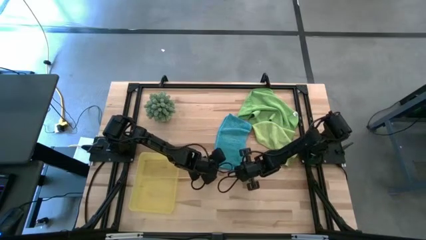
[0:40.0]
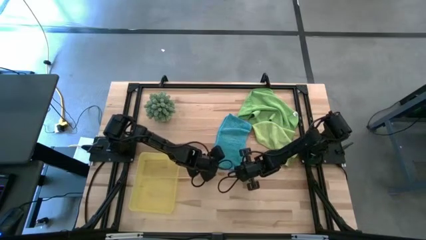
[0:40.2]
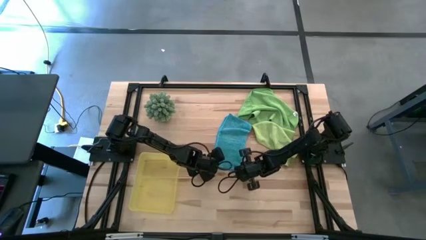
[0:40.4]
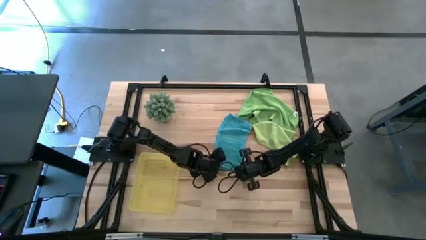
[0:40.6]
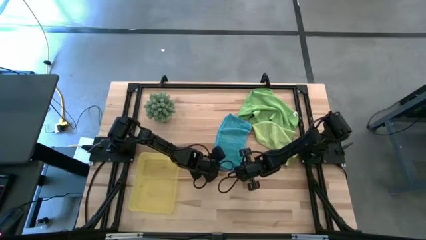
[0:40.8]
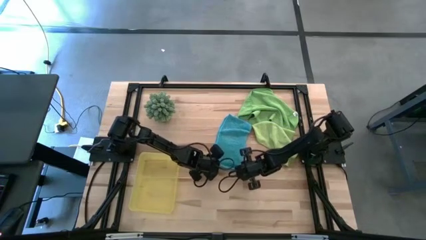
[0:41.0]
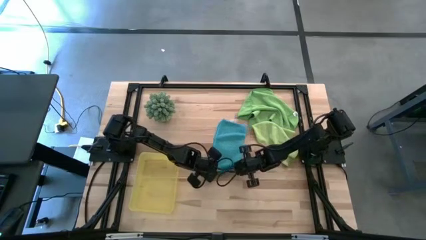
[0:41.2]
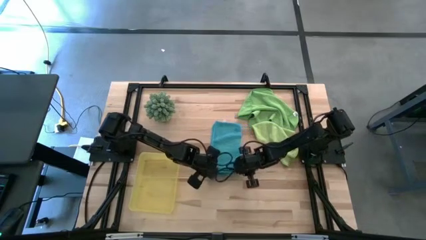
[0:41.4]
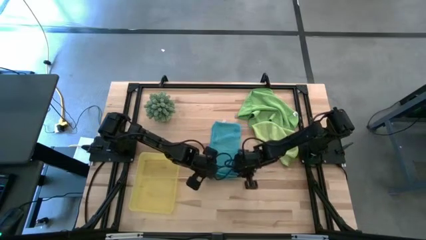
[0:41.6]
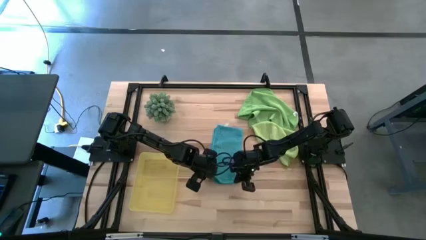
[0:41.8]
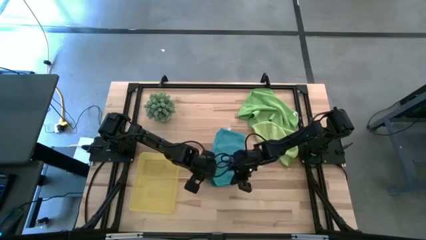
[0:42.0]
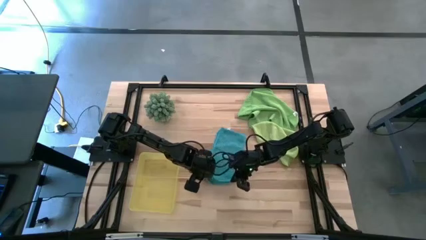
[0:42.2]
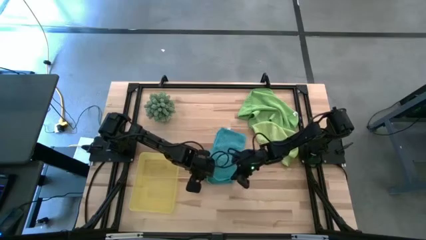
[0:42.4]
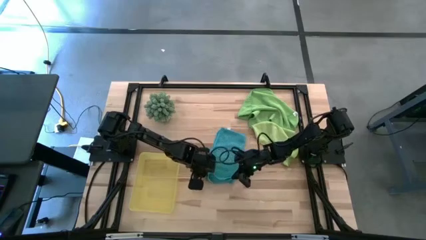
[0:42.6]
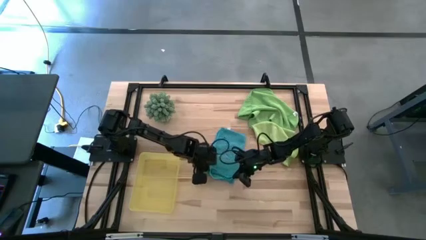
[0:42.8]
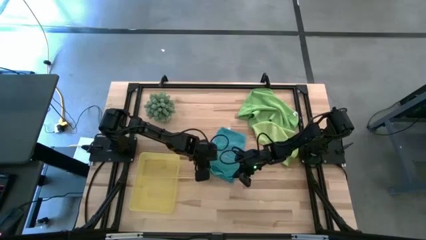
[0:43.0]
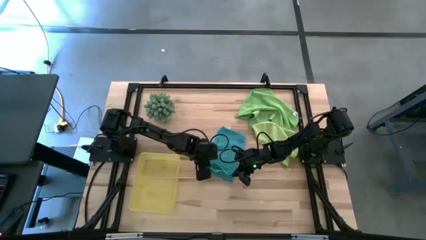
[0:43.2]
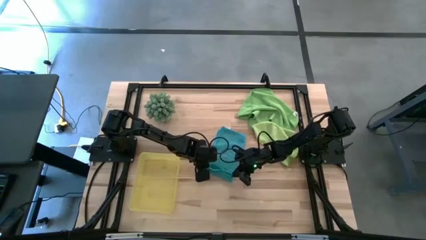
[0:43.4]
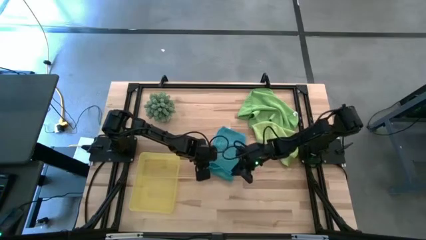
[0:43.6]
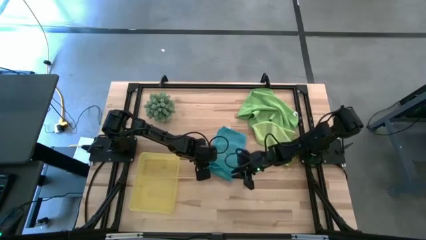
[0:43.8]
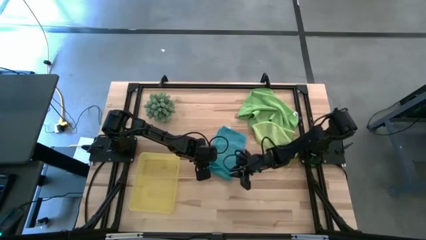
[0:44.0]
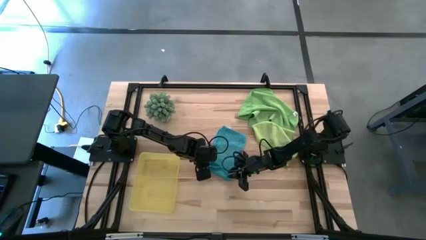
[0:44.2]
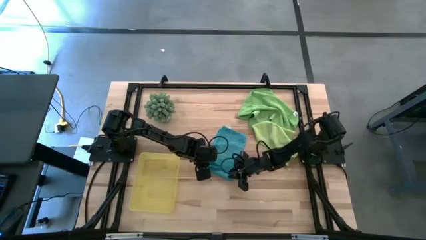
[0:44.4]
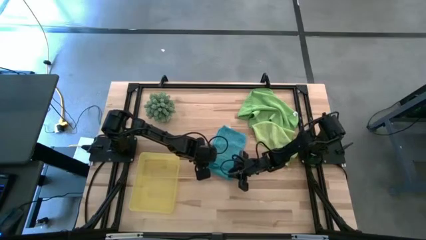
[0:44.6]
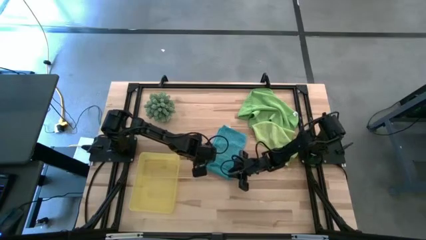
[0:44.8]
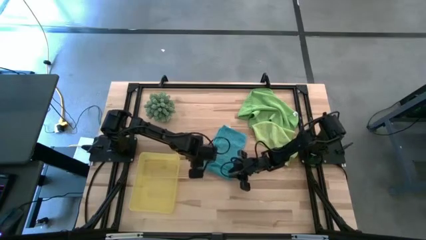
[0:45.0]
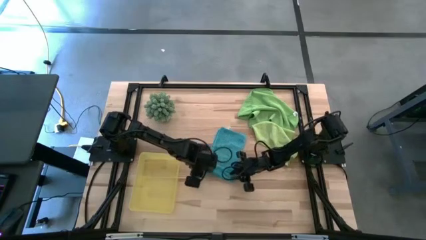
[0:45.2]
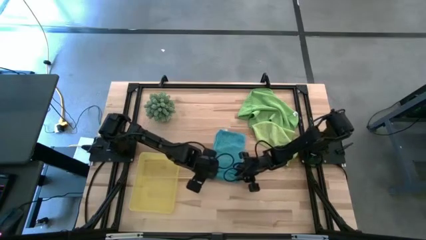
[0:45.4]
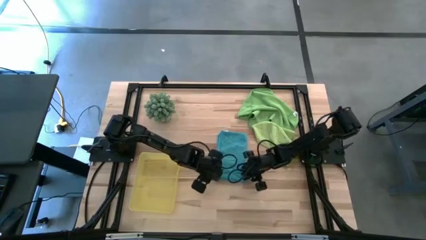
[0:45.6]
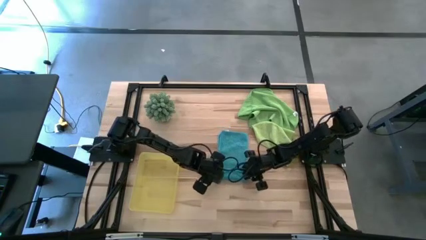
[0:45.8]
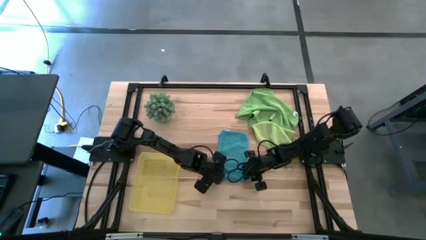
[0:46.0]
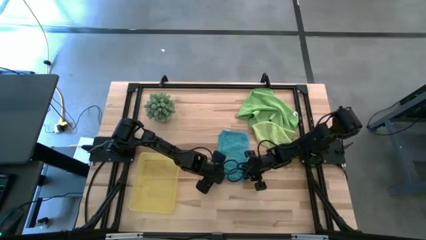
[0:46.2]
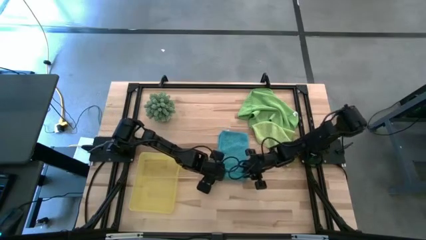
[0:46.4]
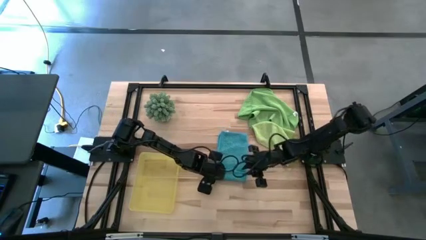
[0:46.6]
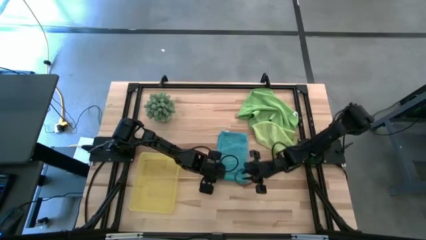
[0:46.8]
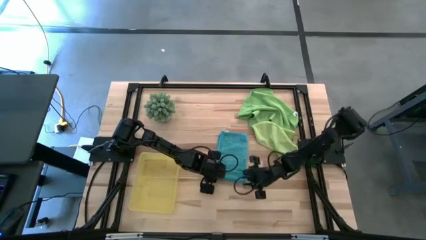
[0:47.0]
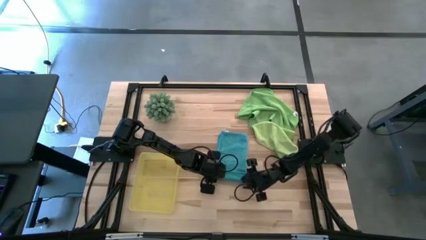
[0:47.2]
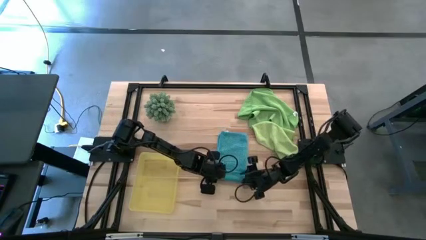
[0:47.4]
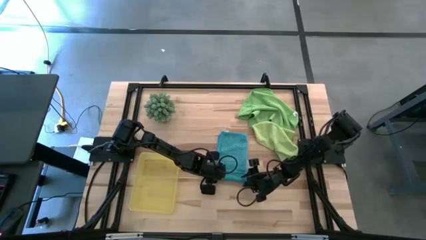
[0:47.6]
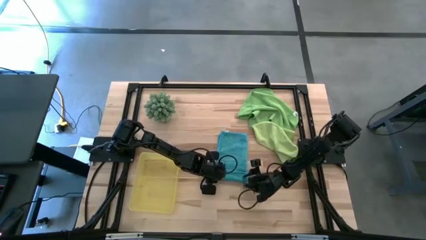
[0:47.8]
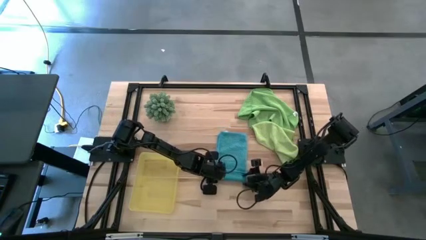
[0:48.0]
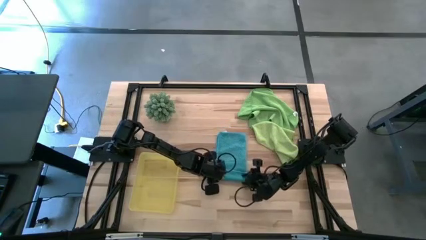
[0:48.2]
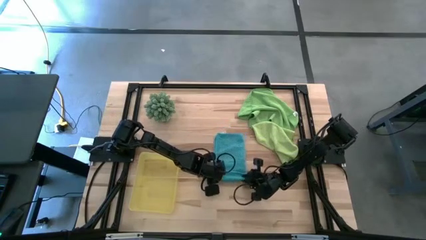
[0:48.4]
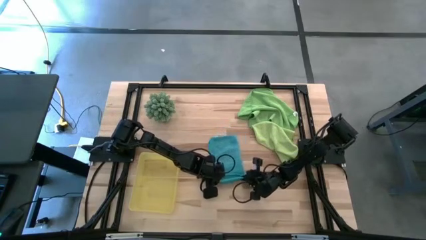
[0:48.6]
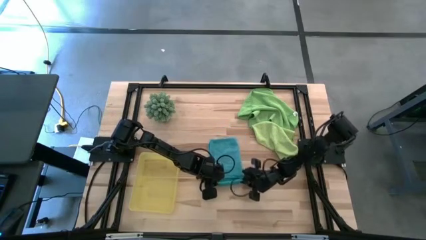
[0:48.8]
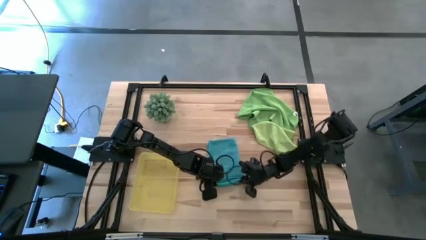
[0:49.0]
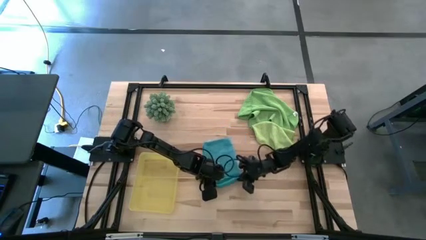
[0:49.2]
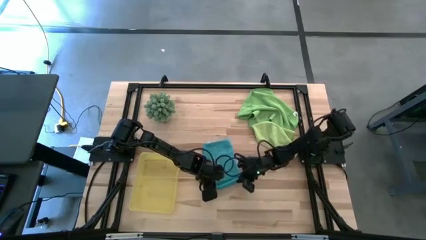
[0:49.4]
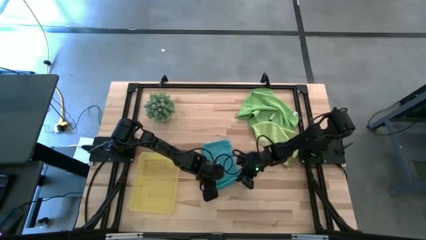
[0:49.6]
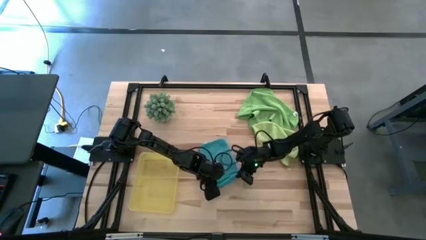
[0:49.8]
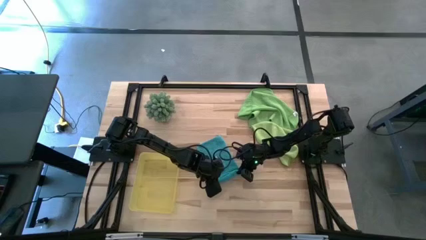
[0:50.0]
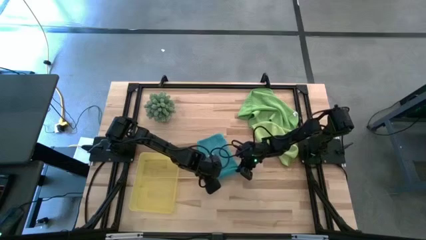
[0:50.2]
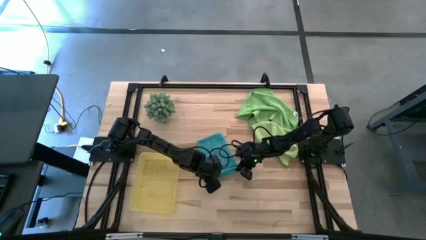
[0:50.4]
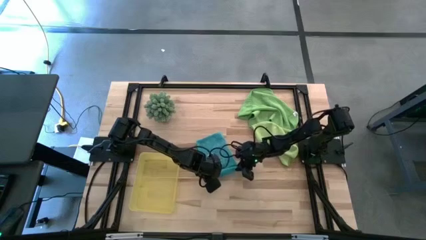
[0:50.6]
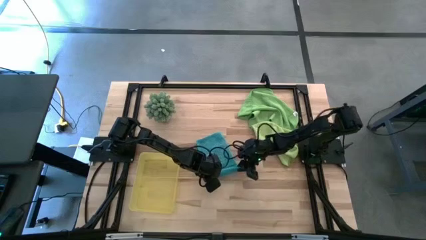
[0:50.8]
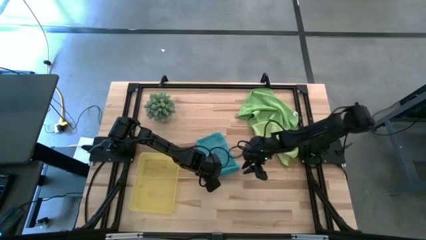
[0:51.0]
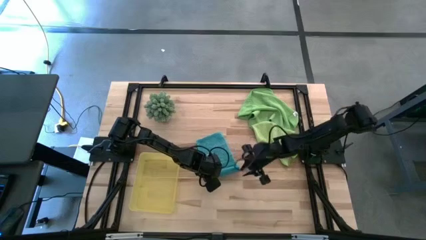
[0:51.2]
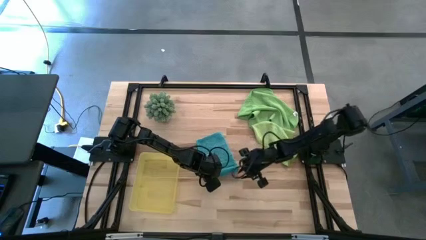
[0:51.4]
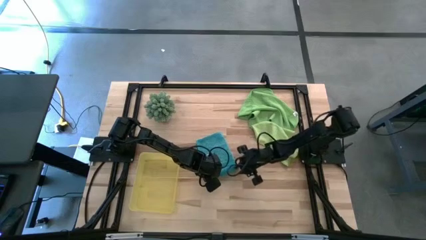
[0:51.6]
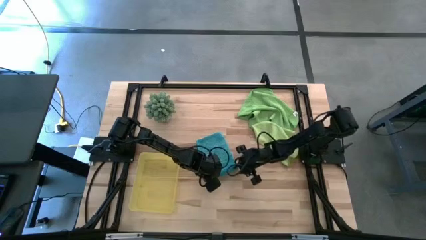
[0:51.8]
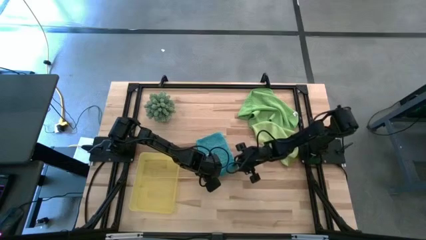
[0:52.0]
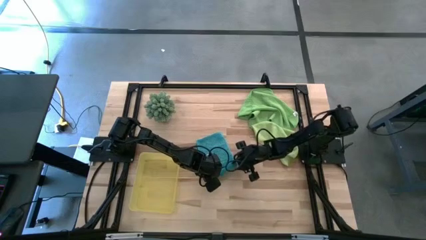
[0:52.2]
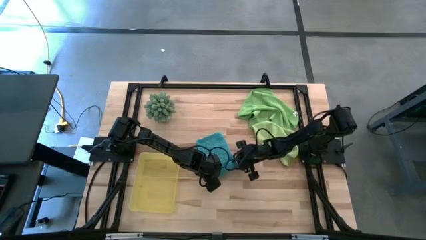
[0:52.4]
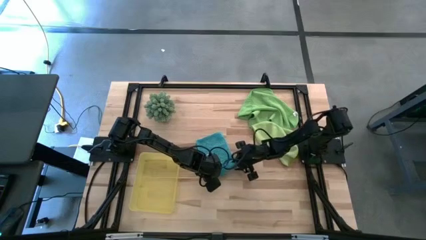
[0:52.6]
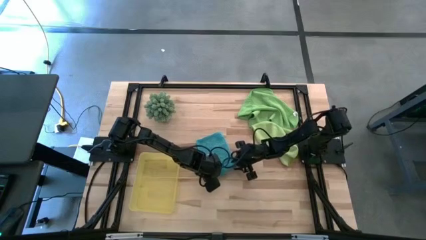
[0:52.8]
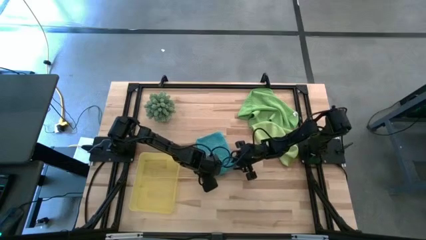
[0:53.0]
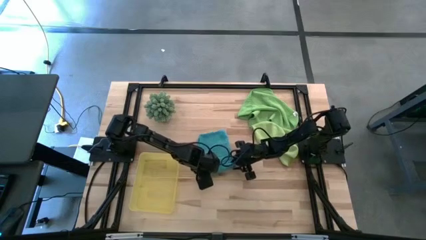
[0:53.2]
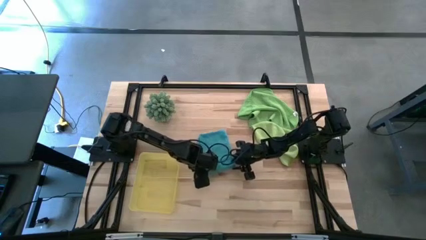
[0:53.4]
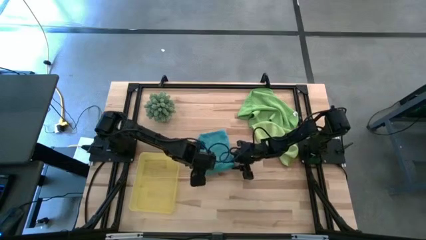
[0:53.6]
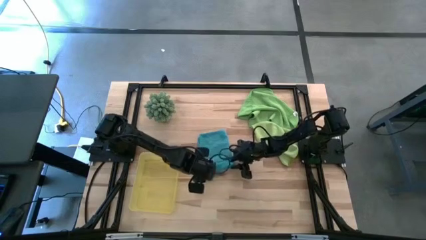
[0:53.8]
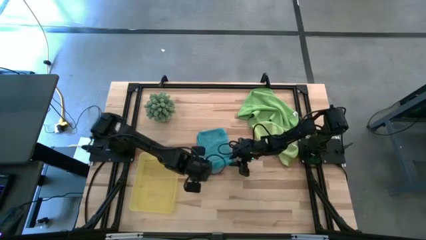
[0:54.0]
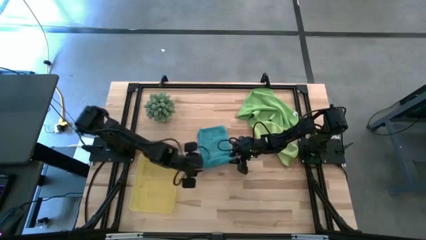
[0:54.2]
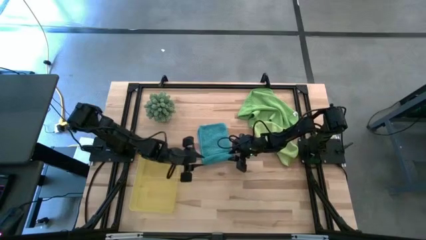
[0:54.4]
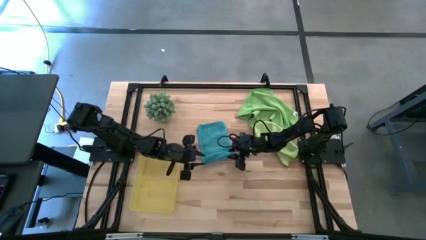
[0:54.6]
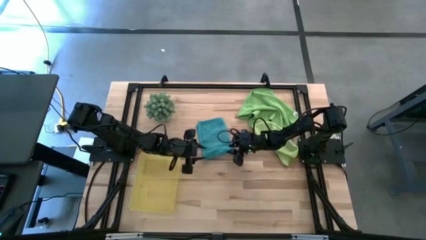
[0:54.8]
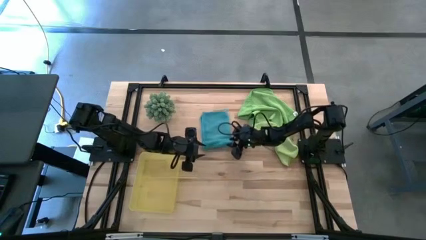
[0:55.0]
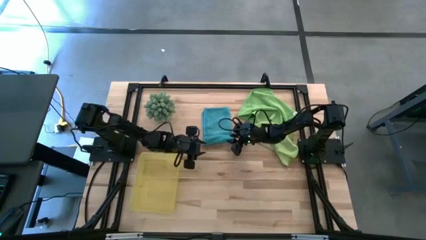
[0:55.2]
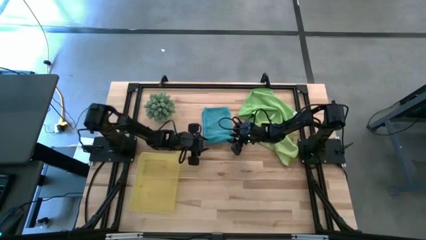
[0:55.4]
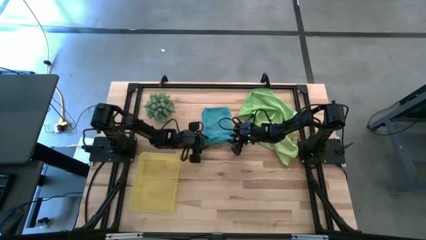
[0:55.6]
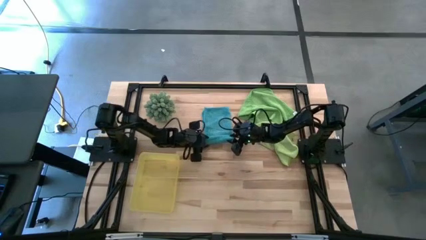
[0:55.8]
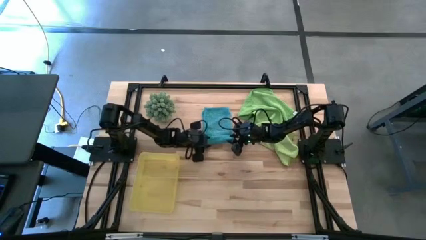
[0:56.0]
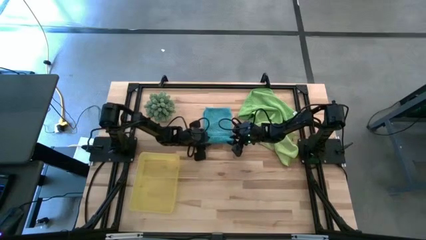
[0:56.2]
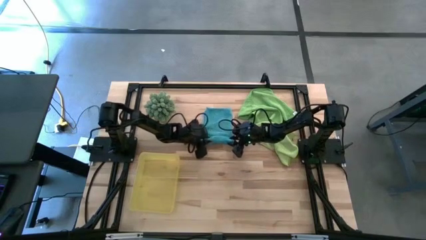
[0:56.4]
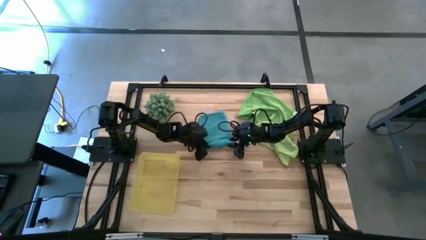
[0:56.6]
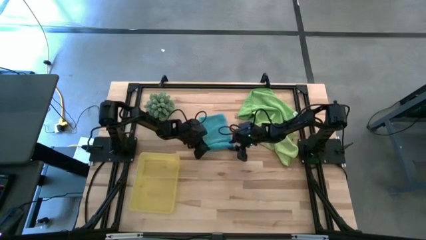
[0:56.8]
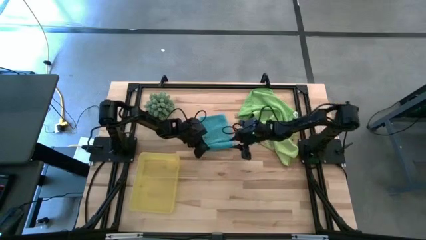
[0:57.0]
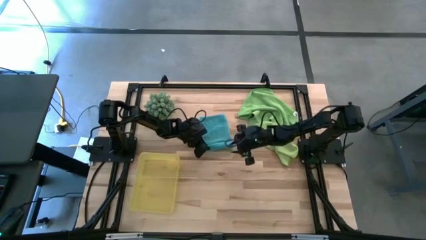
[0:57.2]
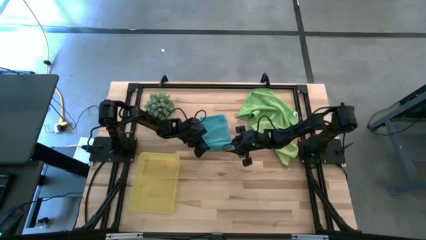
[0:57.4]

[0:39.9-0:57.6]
Task: Roll microfiber towels into tight, uniform cylinder then place into a basket
Roll the blue towel
